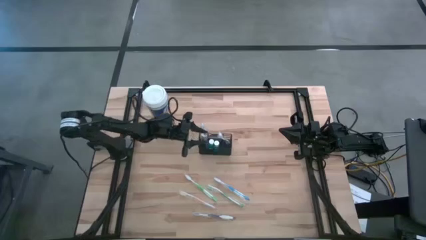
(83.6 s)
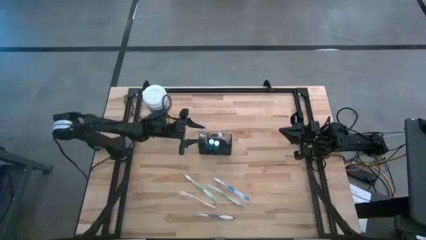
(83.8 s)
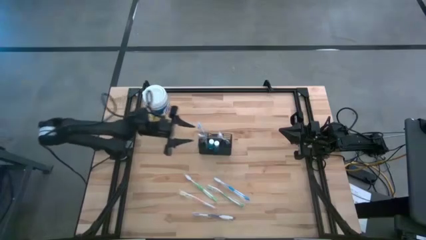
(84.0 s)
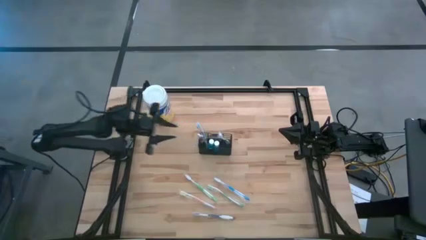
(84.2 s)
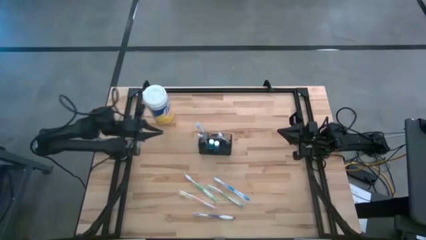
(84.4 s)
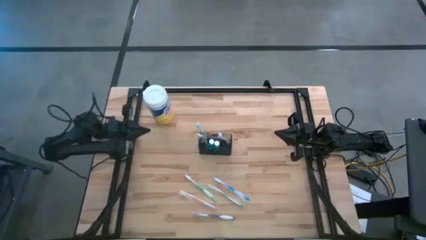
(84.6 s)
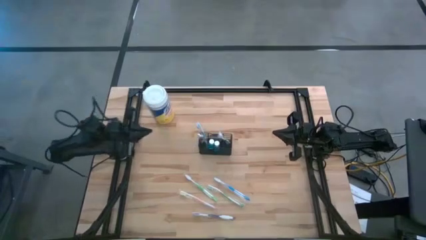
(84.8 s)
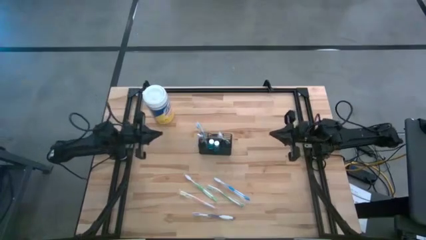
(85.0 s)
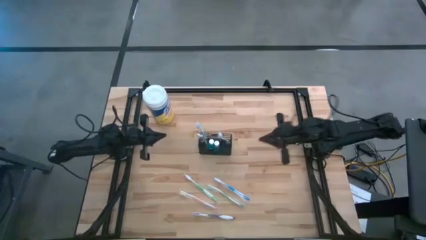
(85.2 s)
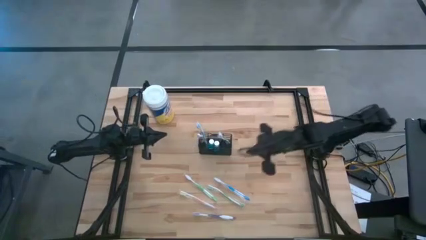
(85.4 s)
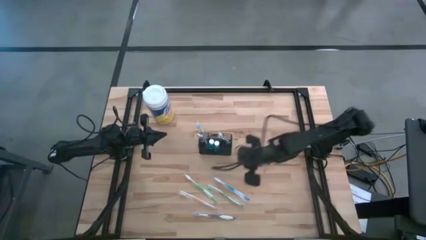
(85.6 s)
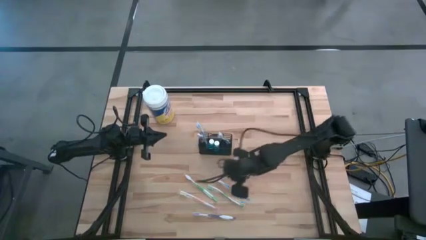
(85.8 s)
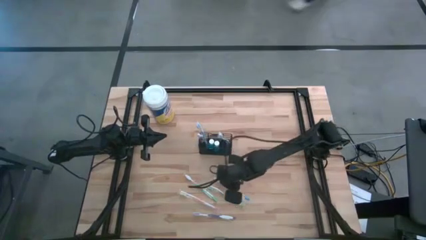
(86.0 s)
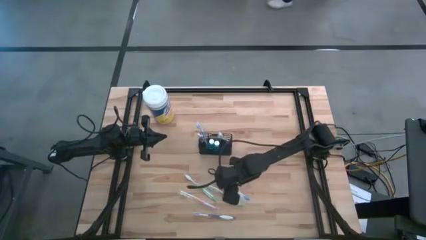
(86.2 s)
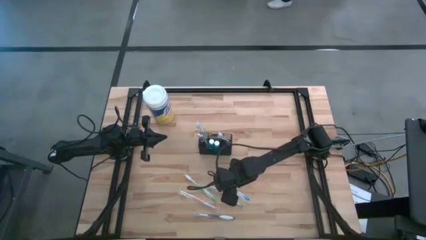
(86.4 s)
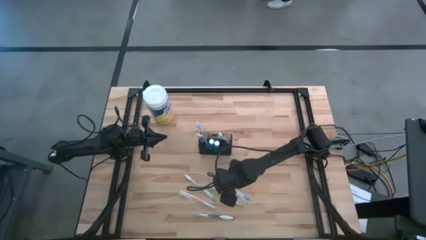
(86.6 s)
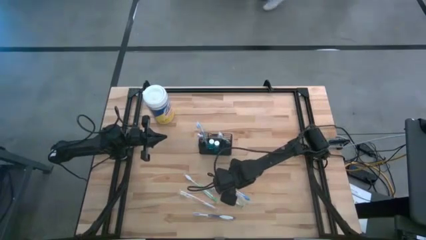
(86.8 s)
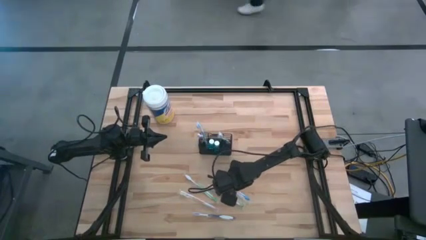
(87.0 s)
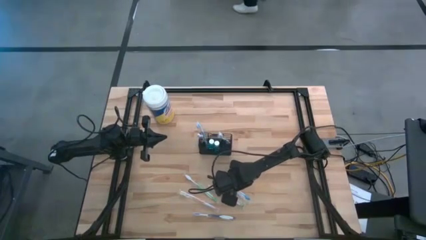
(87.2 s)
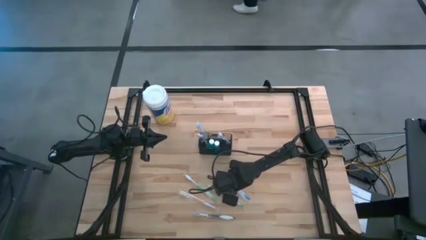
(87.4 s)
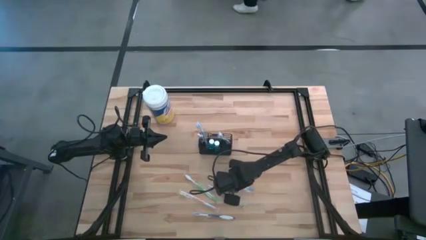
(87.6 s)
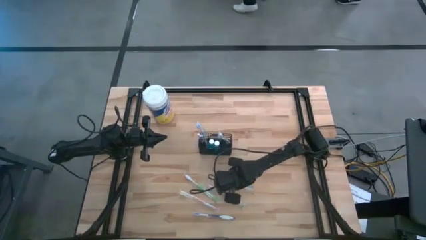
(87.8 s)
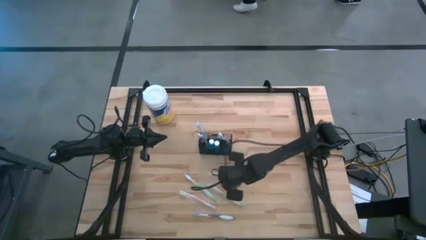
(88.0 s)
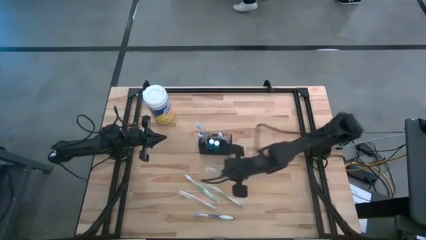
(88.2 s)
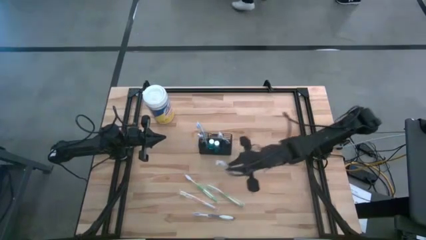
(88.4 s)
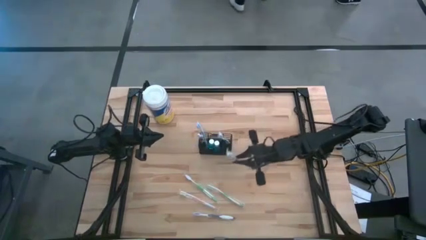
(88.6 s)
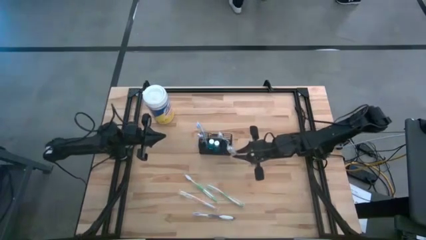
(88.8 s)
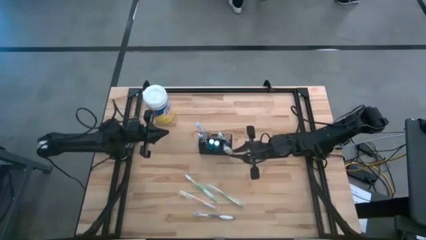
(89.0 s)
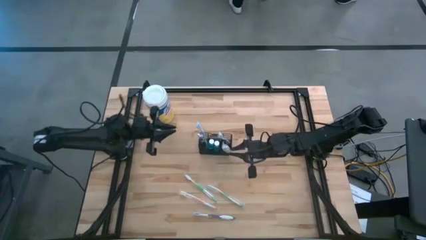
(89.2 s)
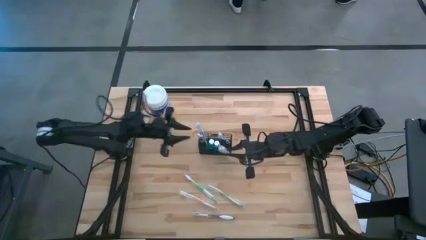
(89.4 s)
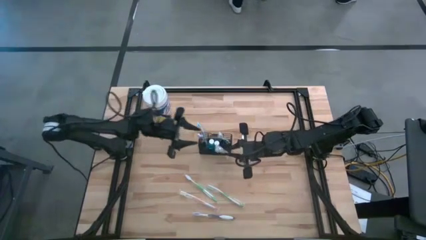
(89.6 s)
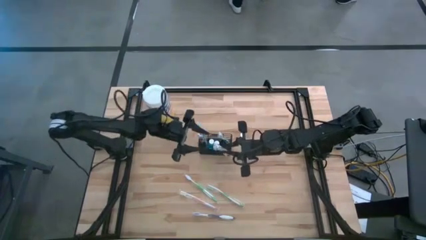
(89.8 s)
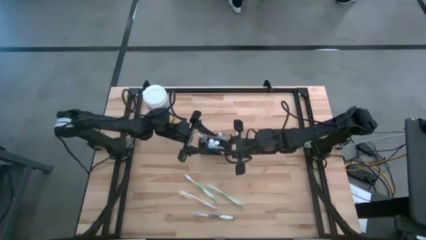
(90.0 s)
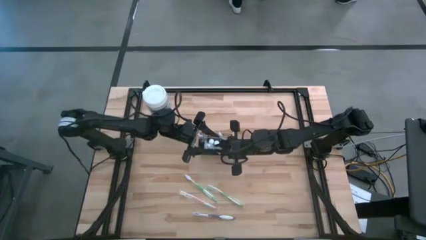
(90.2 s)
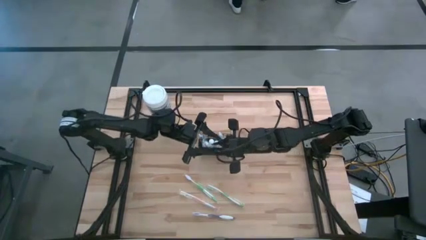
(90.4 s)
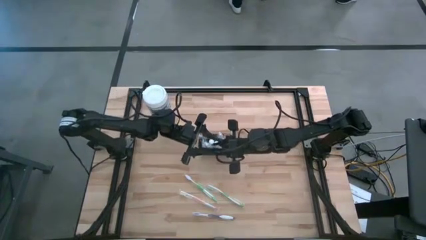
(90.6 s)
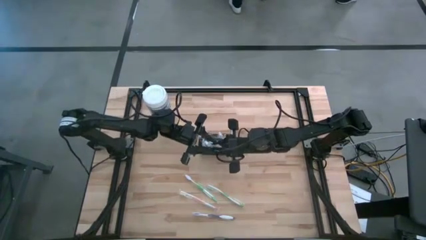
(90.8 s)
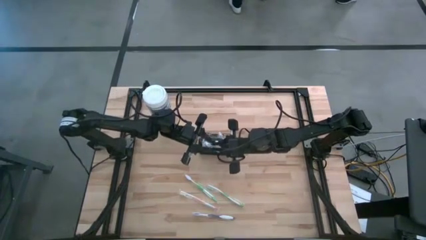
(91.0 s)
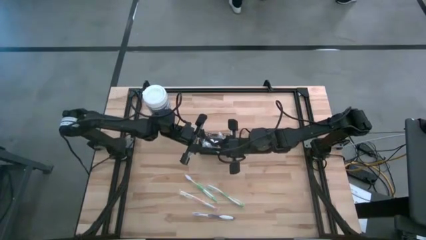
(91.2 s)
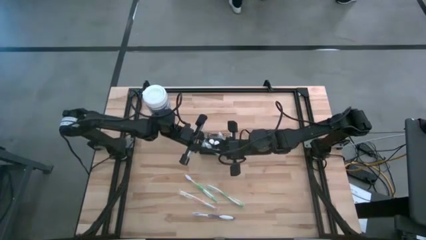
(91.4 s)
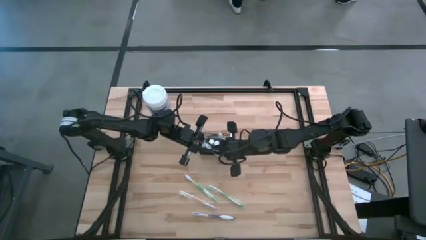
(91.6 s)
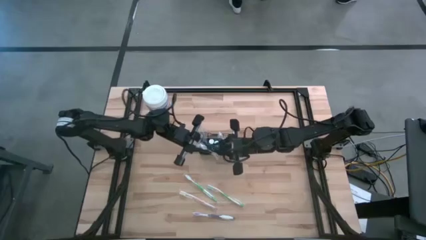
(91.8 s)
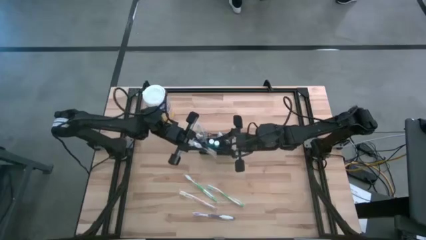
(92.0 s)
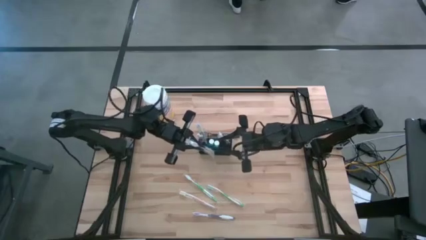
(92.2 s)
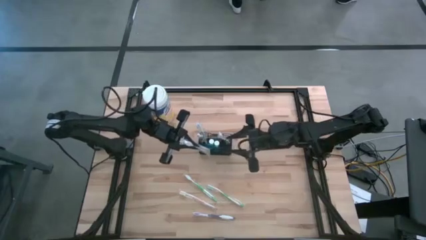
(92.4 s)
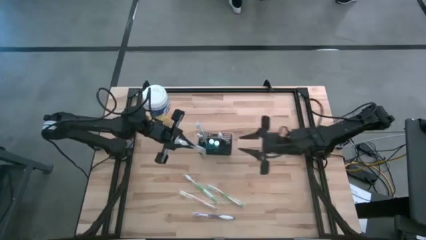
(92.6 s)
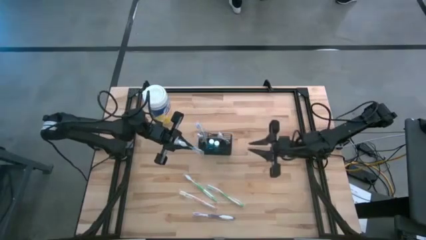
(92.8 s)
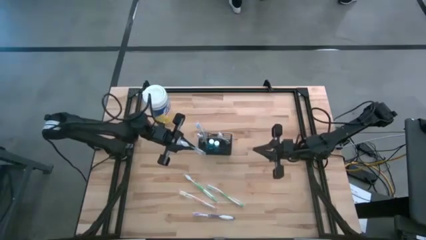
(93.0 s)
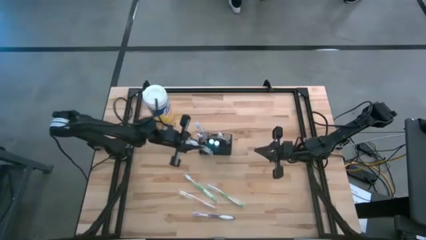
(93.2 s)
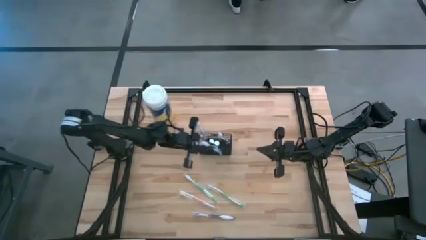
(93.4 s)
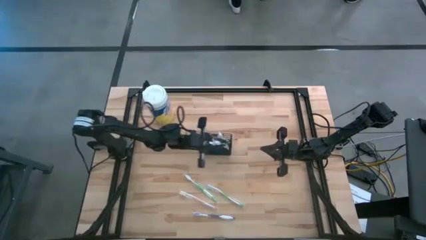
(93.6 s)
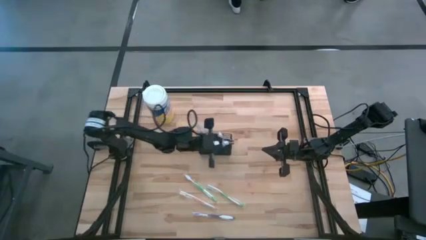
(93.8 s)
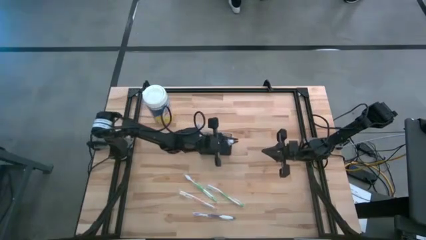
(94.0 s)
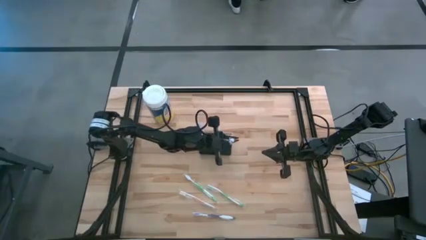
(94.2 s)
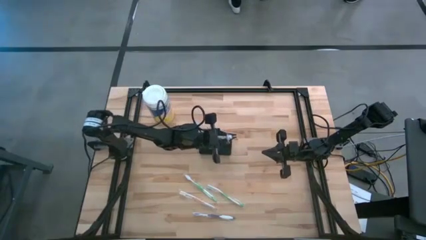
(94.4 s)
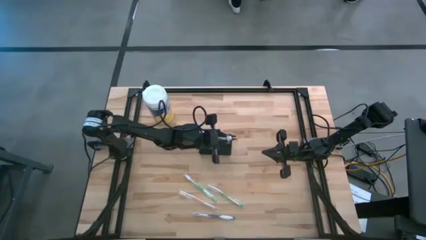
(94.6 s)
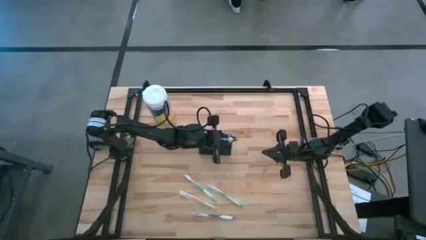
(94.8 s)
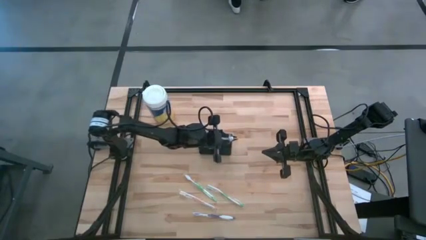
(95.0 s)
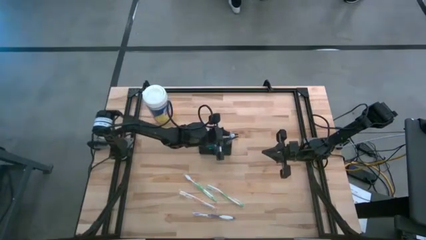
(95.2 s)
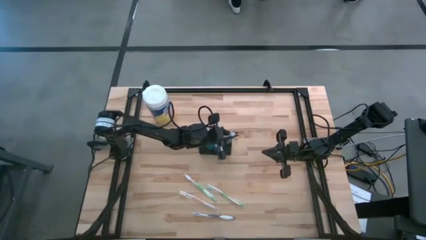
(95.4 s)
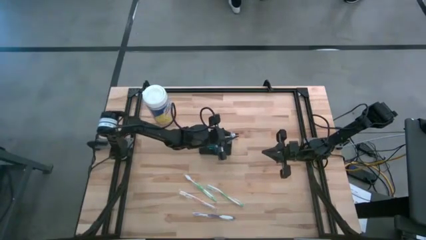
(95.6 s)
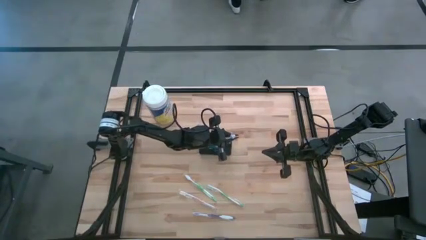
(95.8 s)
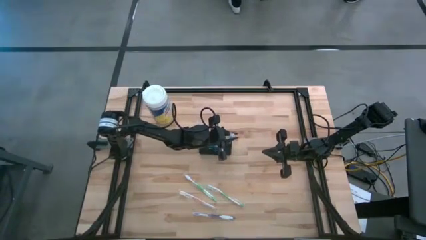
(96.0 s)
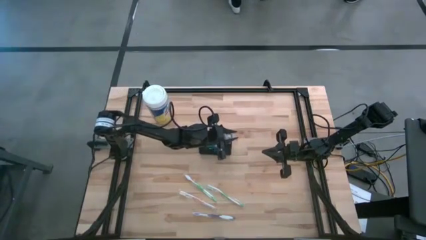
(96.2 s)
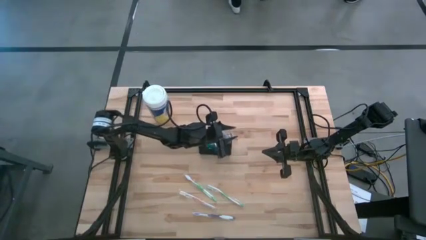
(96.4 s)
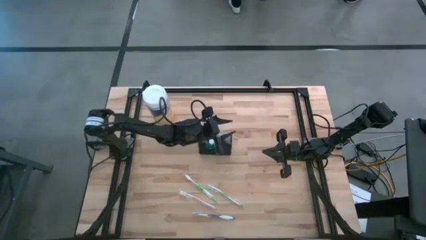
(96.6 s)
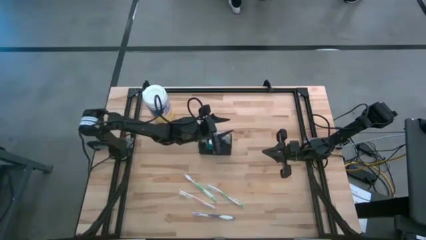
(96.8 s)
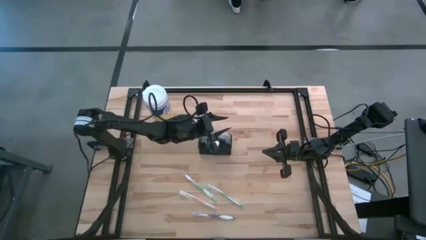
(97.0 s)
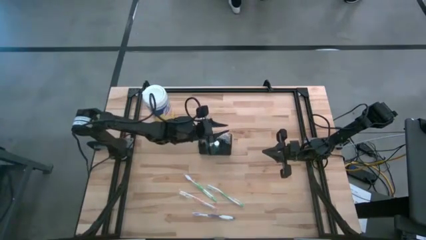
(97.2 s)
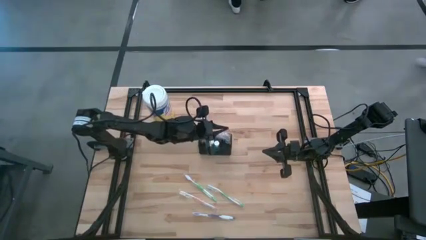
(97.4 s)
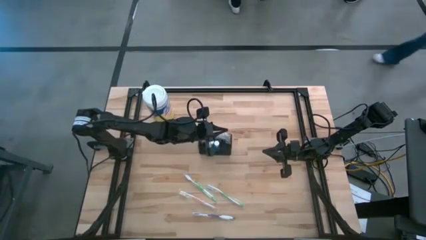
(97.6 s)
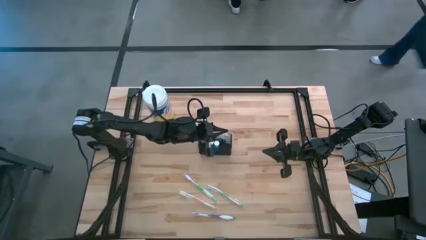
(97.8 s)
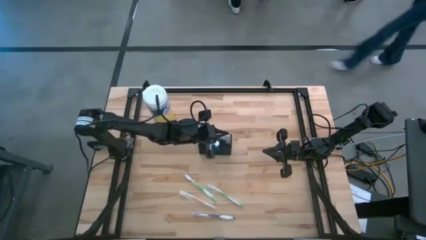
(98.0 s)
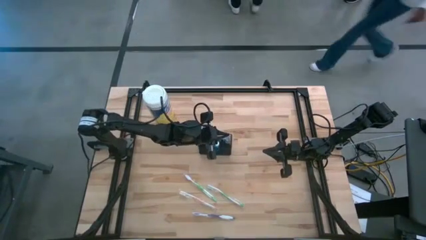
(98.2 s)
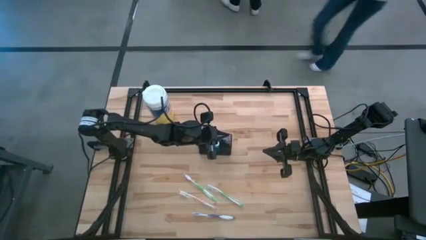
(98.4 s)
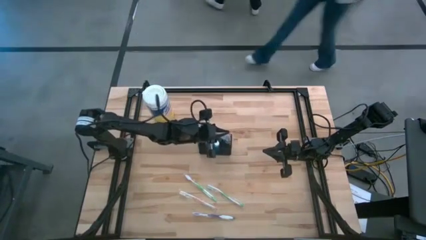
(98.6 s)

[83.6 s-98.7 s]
Task: Pick & Place toothbrushing station
Put the blue toothbrush into the mesh organizer

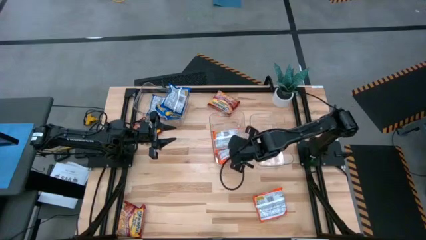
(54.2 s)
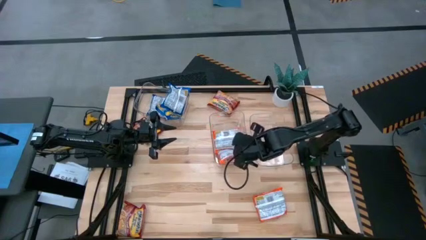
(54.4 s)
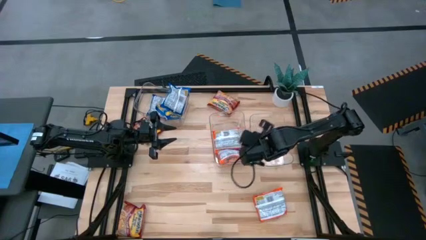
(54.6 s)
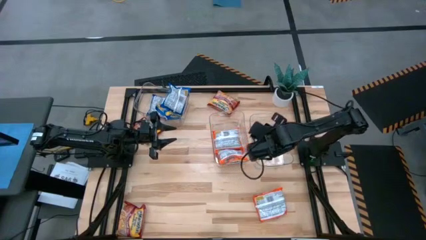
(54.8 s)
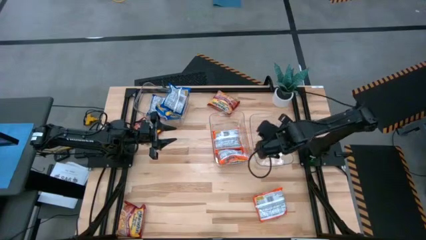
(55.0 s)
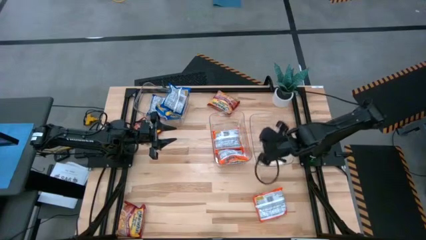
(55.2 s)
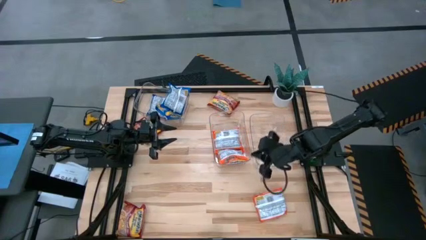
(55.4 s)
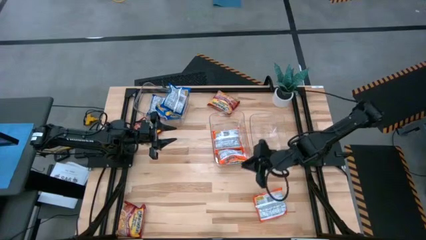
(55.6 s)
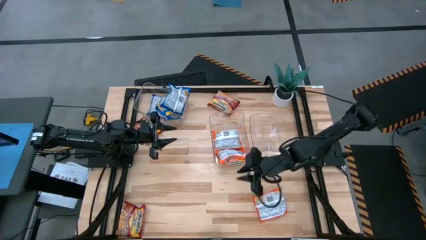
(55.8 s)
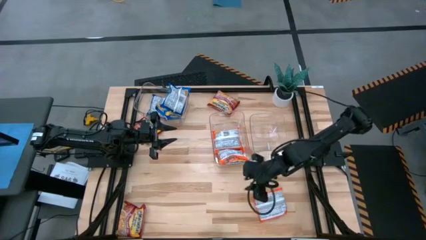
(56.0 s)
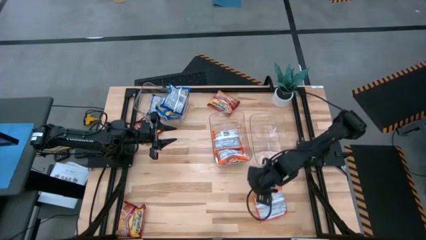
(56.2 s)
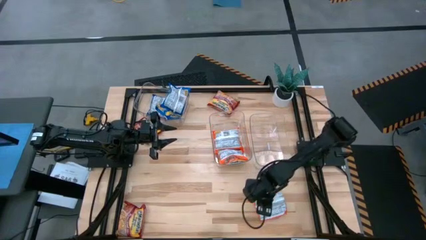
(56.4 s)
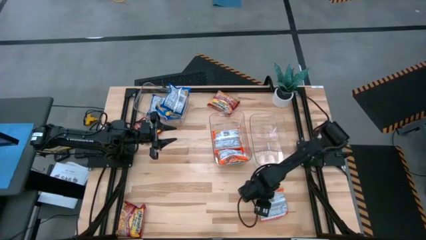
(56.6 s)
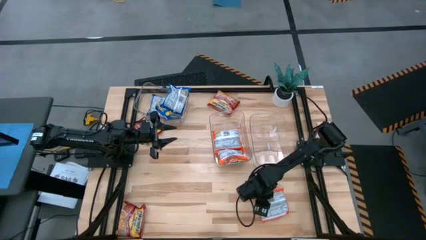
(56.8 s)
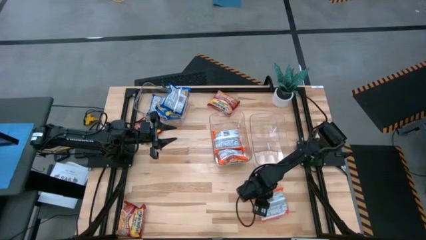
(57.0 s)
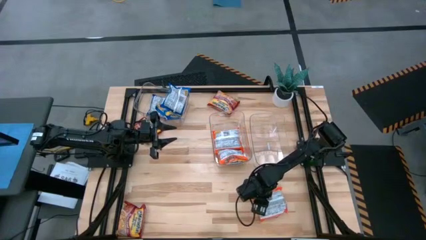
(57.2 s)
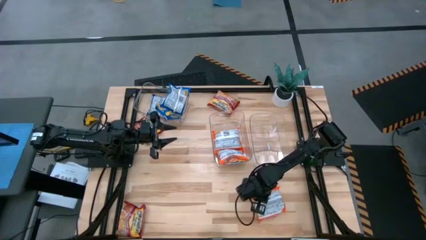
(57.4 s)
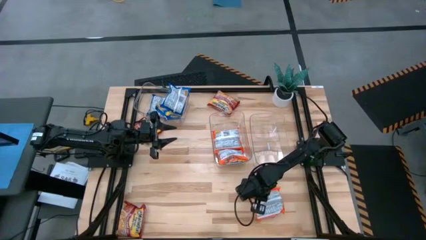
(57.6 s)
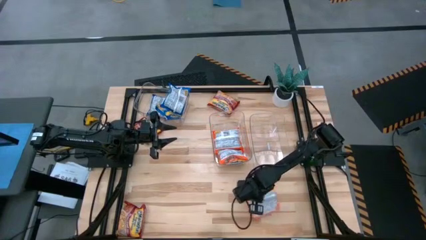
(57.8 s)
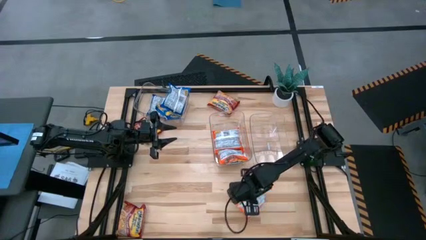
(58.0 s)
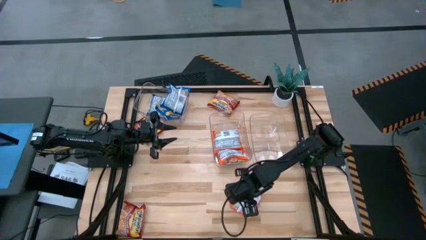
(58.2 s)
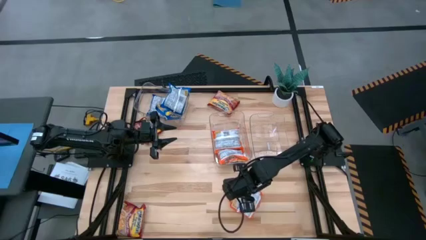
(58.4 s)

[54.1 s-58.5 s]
Task: Sort Maruchan noodles
Put the orange noodle pack into the bottom center transparent bin
